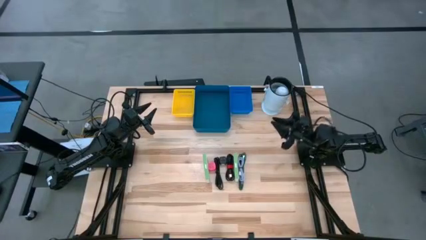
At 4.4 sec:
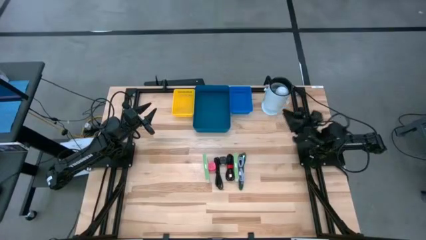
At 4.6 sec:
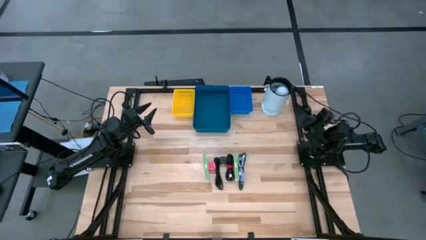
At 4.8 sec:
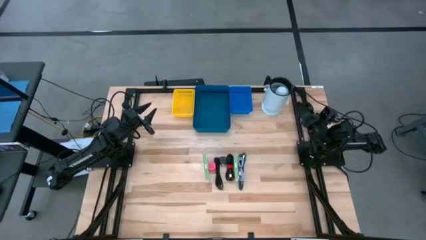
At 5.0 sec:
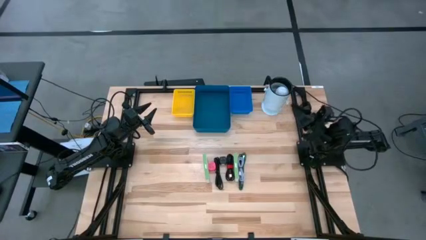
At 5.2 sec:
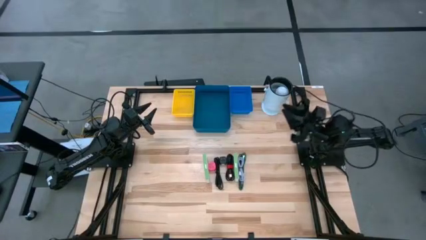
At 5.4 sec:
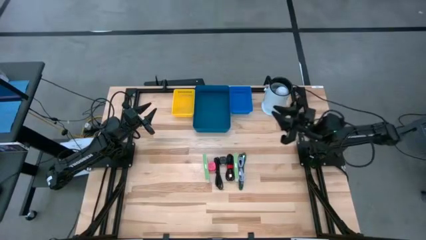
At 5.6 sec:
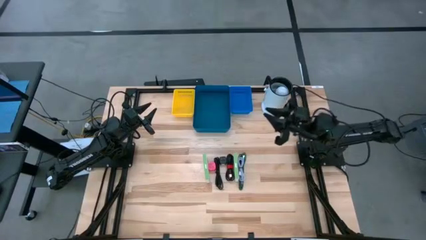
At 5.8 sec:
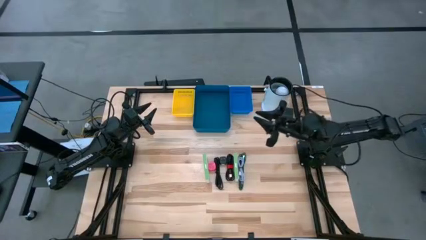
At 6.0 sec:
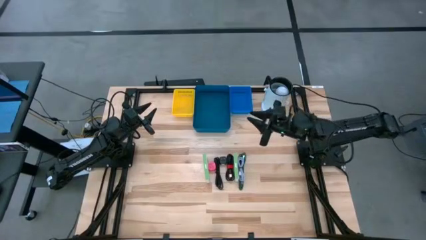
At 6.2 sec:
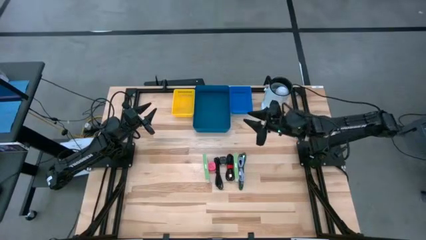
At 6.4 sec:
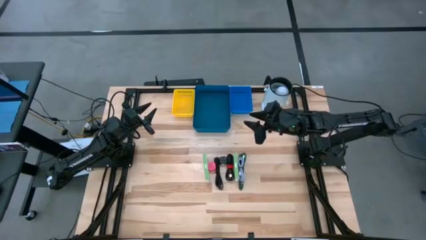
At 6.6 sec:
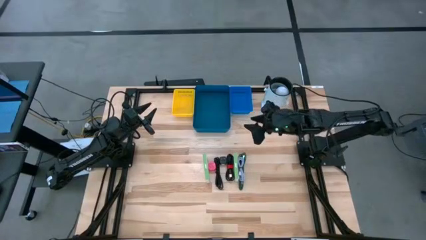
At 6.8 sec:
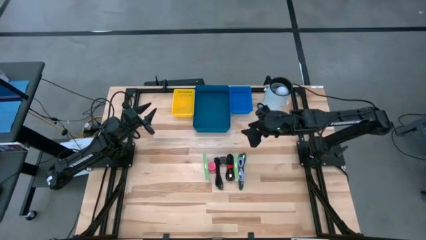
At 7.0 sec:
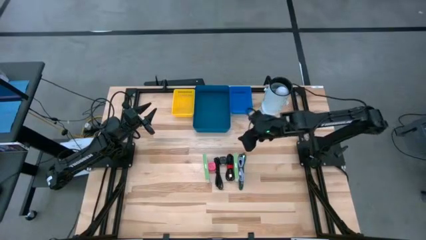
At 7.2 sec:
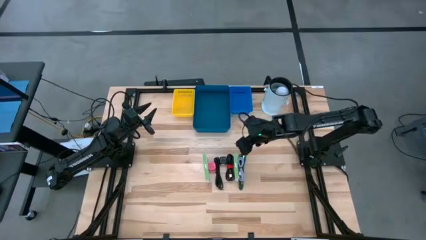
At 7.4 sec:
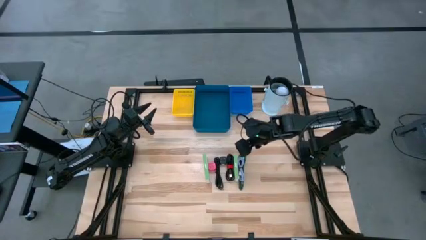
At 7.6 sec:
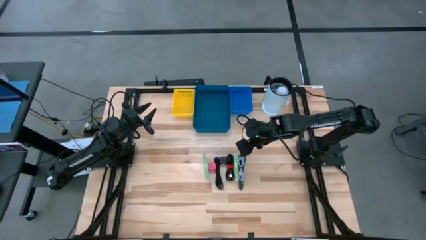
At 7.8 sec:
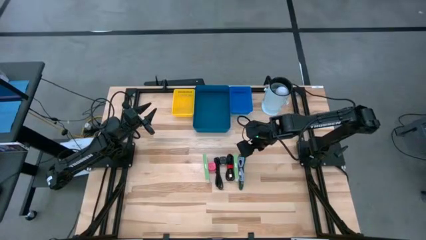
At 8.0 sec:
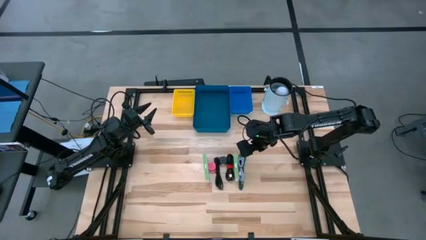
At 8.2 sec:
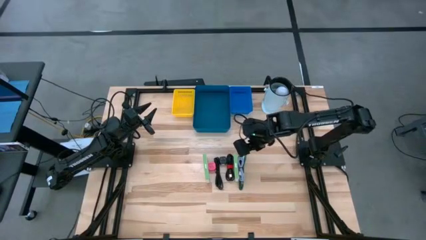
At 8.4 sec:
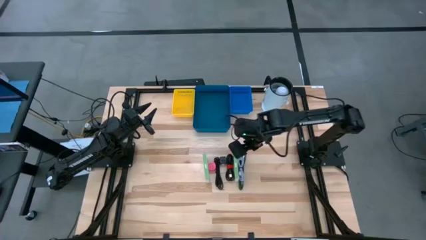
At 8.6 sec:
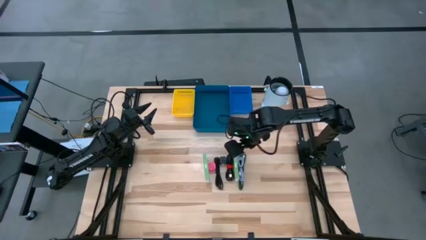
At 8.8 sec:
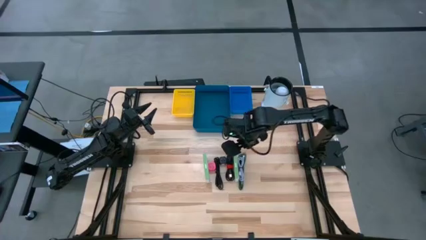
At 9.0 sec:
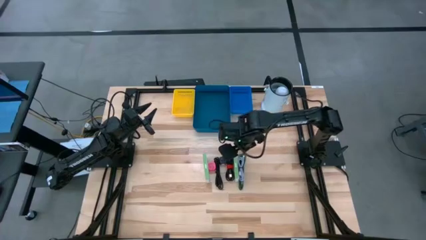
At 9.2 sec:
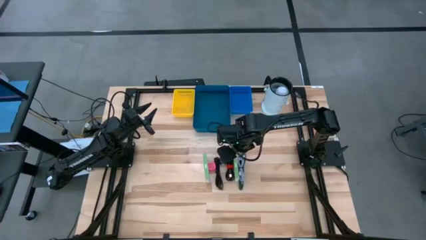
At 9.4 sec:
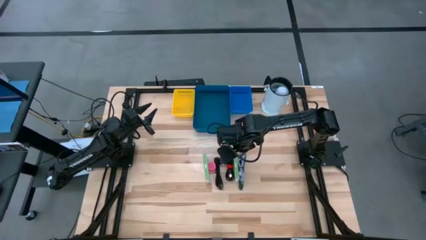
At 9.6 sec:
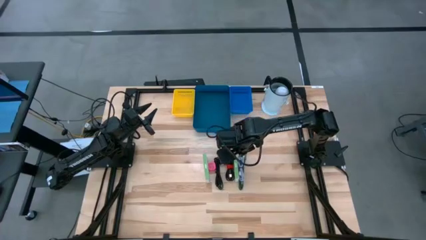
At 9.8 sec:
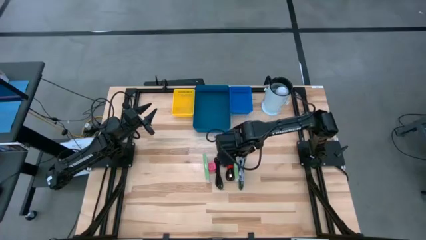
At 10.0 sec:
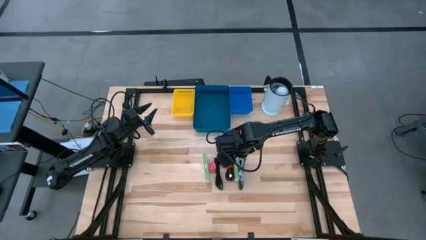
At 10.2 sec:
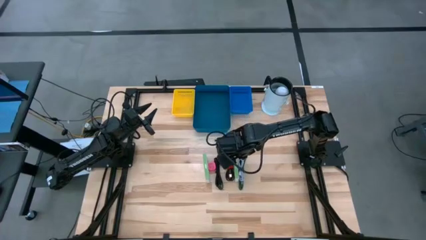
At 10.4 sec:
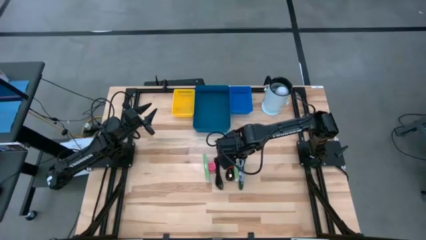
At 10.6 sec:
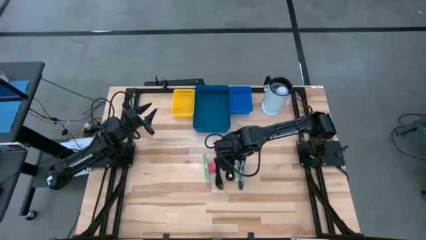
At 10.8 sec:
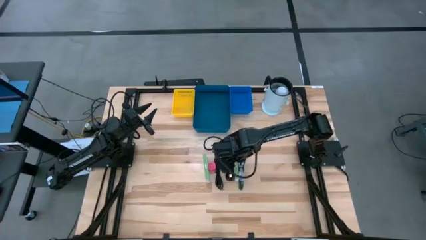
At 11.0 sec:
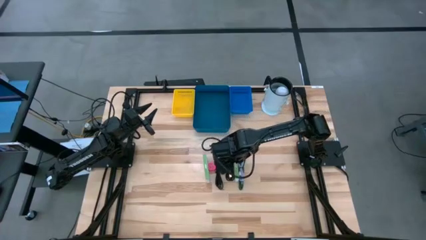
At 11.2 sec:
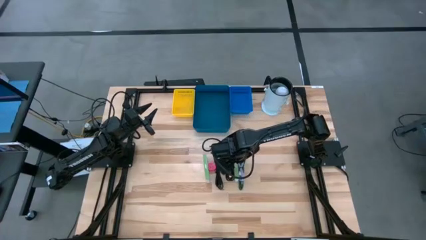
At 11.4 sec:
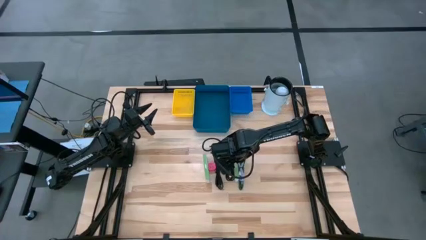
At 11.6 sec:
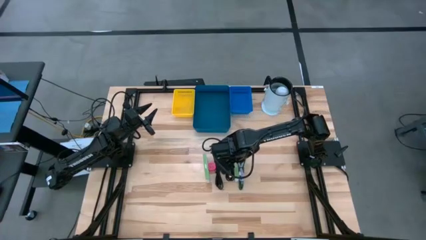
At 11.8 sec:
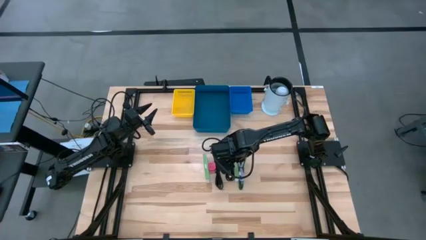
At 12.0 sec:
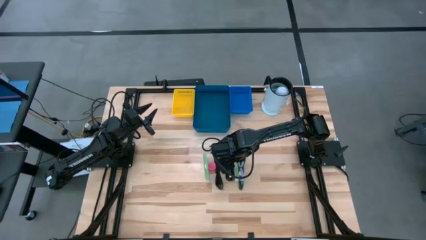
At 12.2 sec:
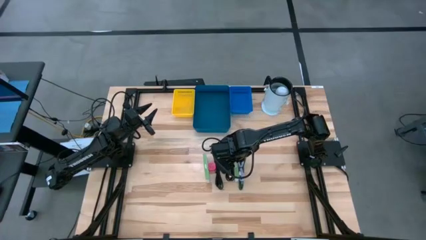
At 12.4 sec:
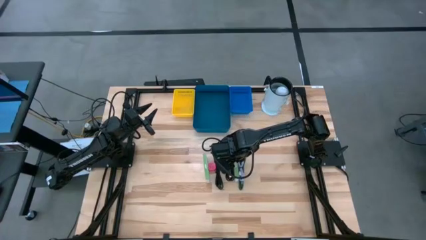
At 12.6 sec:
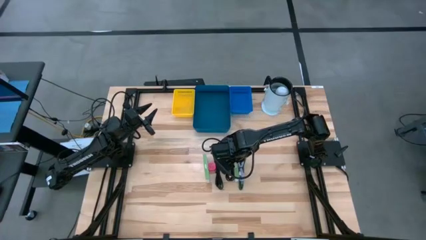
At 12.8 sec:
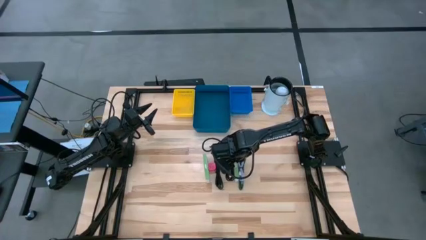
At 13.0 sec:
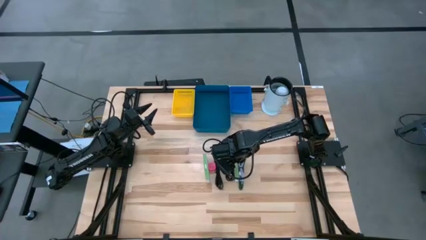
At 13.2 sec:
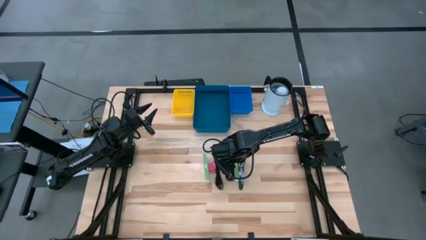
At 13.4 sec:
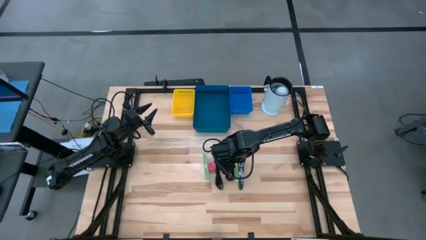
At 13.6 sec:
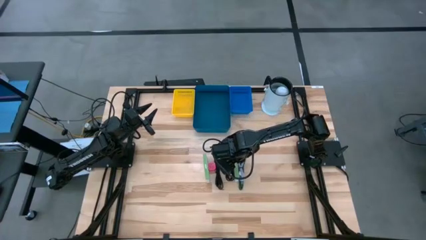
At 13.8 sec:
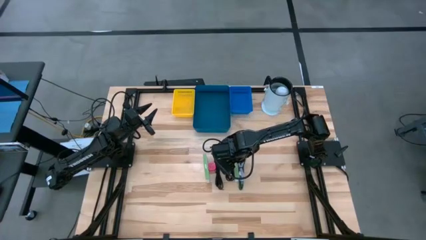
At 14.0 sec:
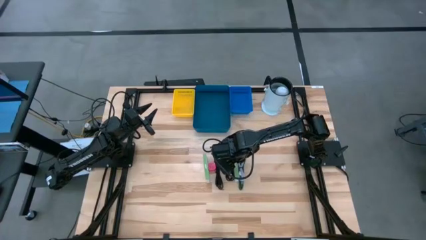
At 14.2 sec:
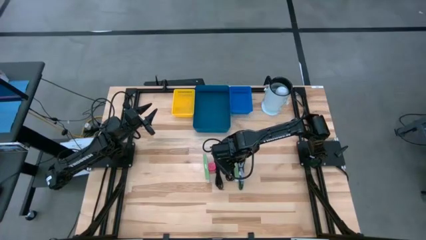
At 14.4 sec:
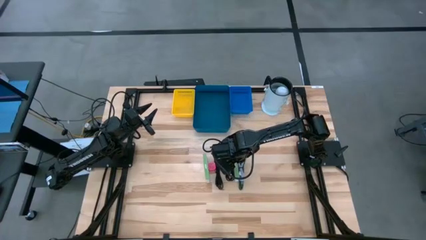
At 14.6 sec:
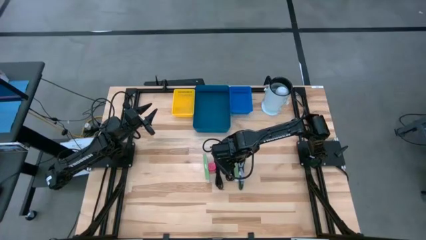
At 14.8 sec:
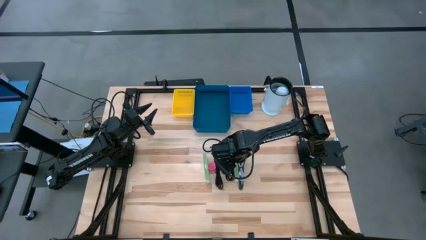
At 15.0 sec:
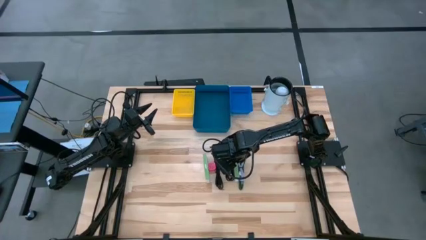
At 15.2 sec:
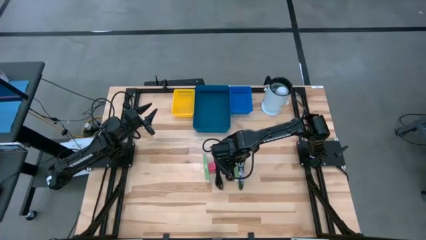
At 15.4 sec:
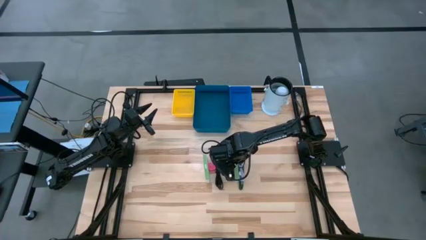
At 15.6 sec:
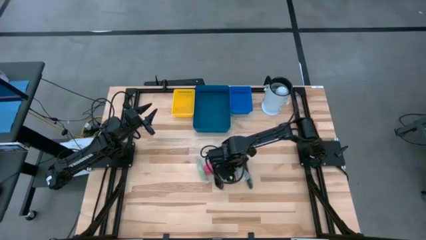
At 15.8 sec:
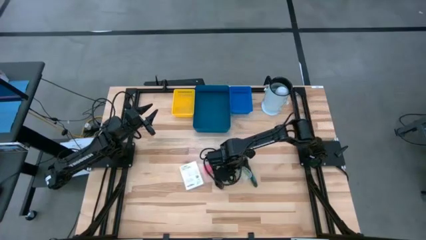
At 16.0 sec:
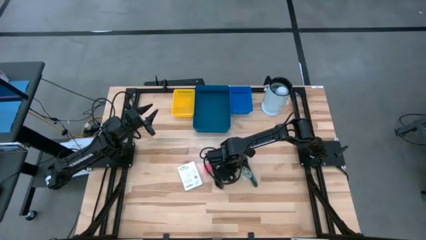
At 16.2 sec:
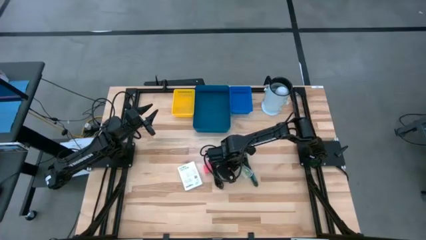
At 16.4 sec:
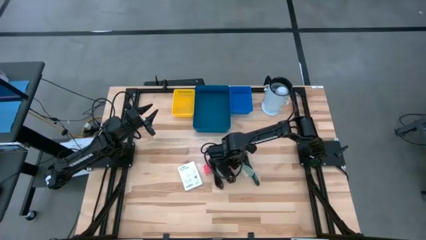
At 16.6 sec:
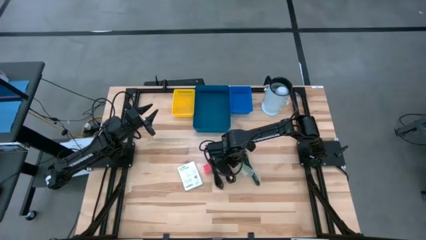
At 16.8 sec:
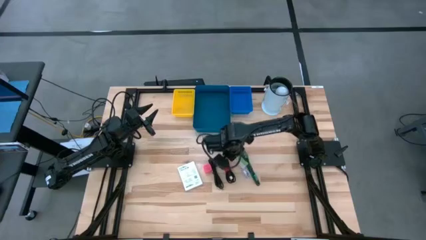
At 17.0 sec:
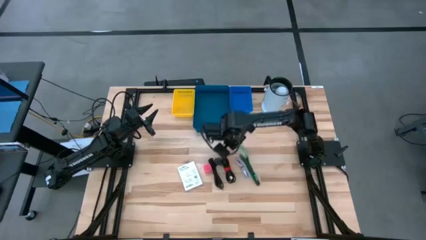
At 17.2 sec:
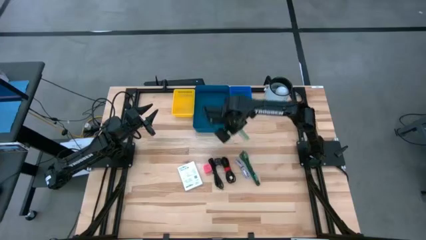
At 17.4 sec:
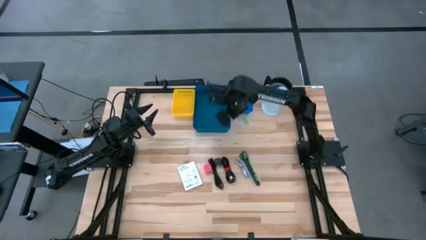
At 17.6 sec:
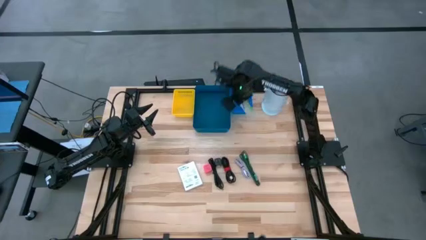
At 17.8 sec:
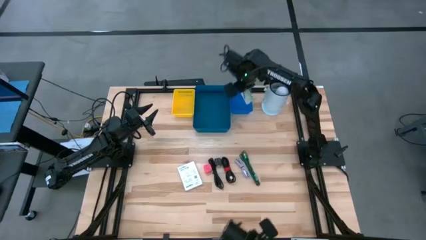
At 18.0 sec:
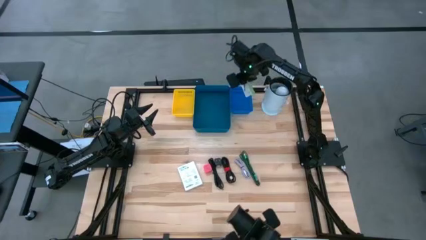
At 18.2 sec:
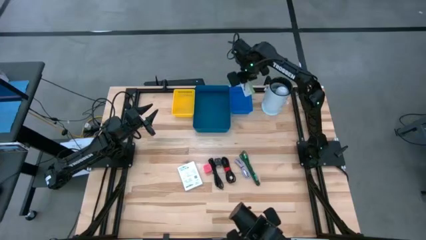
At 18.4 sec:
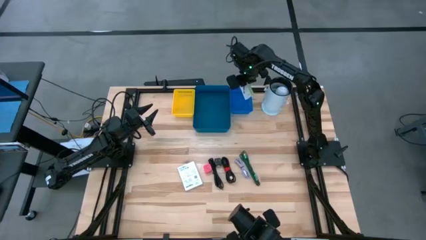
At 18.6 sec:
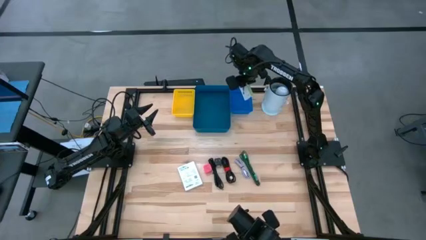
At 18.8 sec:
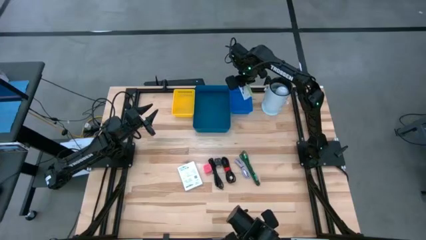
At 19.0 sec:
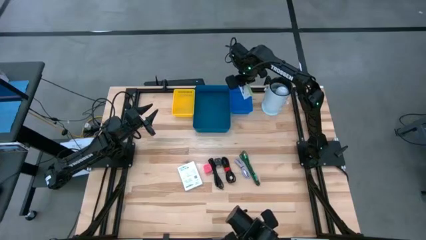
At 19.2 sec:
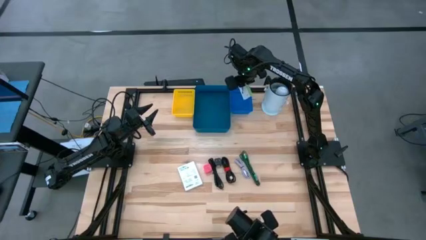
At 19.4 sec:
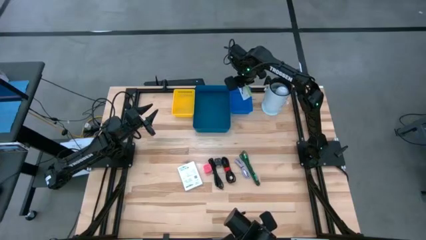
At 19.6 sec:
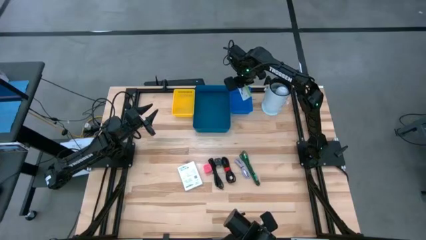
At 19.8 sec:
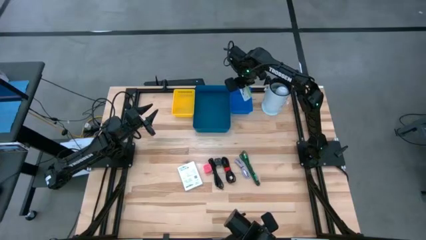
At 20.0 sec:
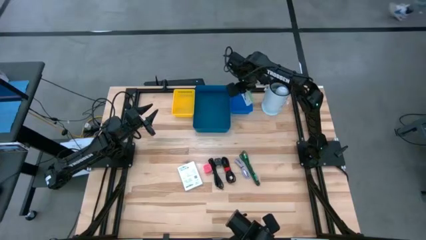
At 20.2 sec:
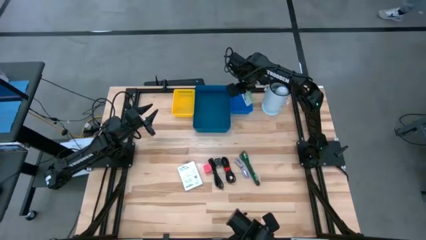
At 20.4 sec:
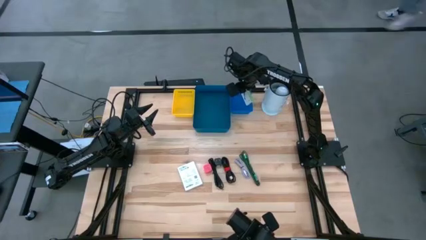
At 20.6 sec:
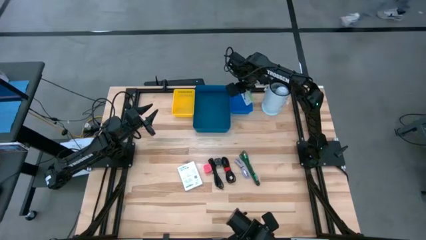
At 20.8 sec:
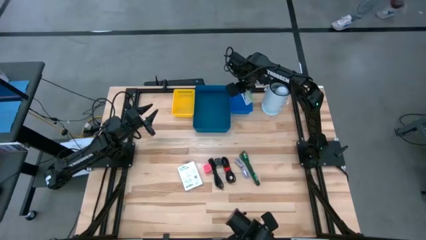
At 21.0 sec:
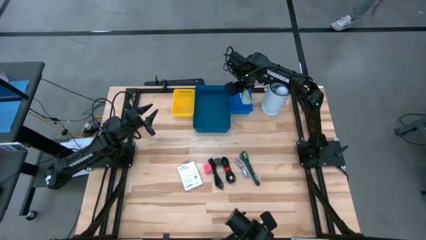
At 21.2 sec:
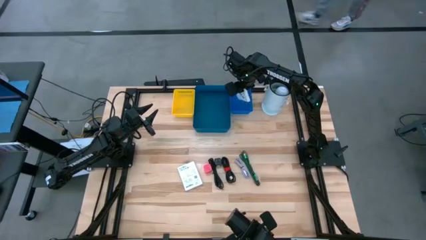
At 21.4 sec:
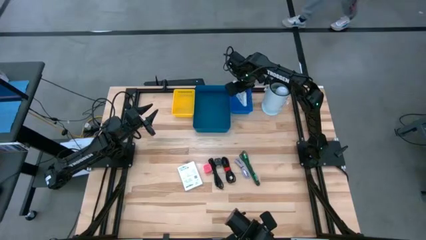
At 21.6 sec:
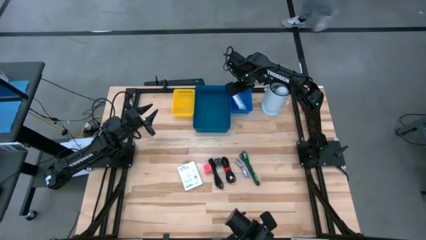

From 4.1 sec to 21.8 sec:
Task: Pick and place items into bin
Put the right white card reader box into the blue bin
